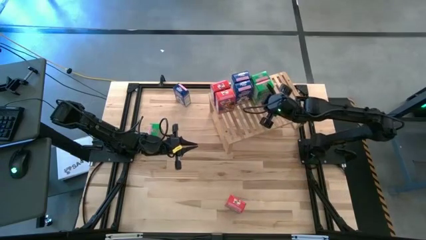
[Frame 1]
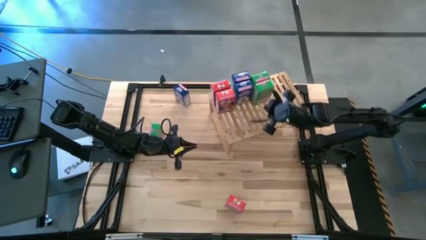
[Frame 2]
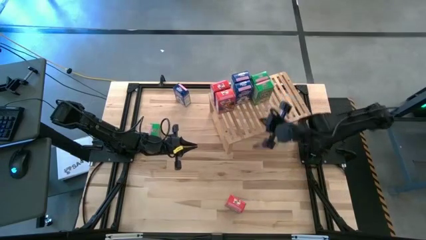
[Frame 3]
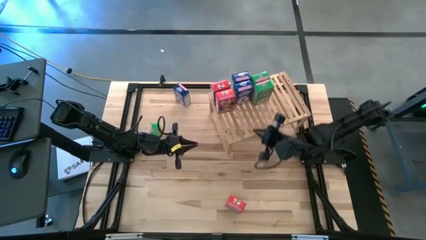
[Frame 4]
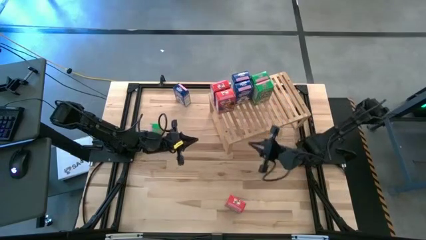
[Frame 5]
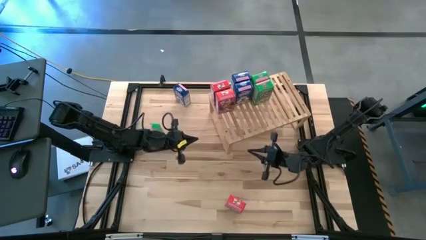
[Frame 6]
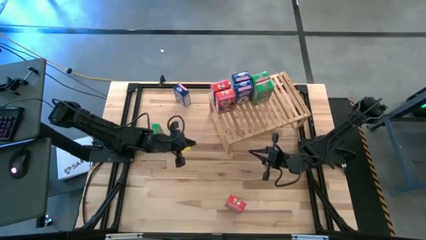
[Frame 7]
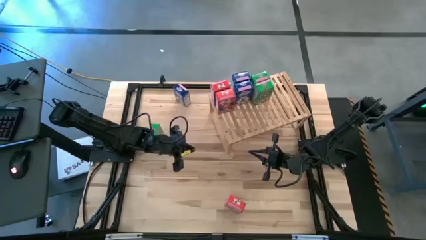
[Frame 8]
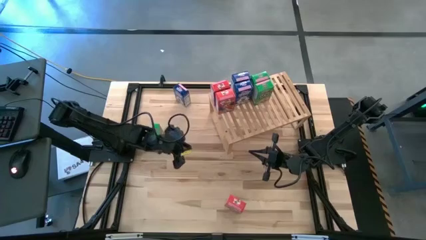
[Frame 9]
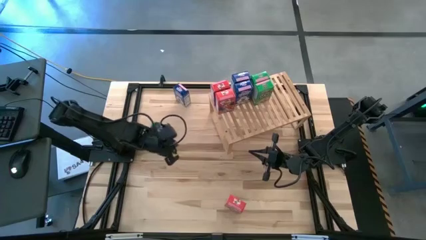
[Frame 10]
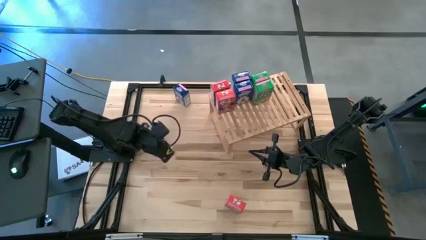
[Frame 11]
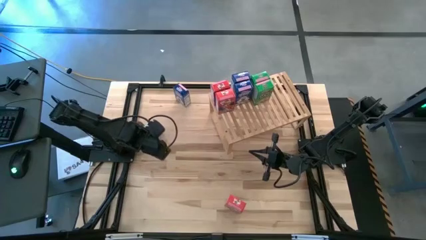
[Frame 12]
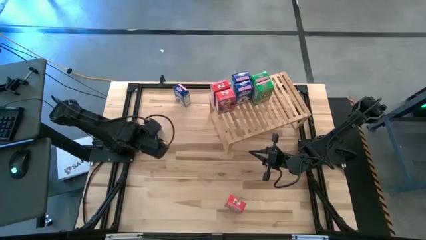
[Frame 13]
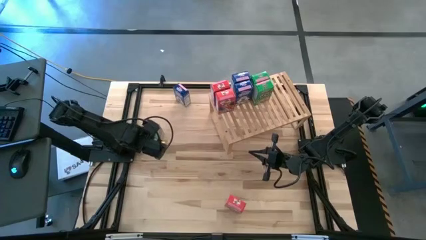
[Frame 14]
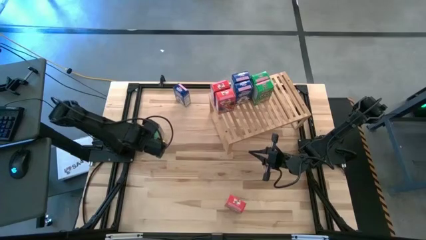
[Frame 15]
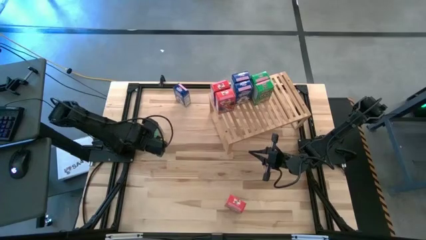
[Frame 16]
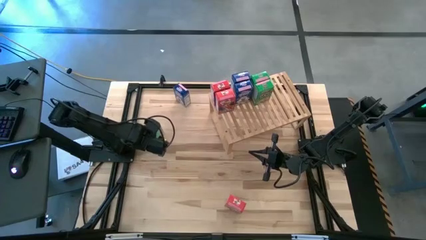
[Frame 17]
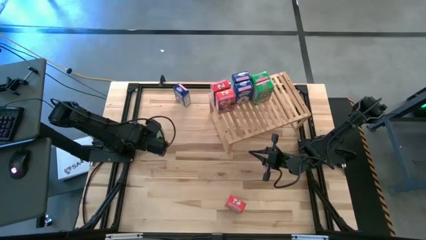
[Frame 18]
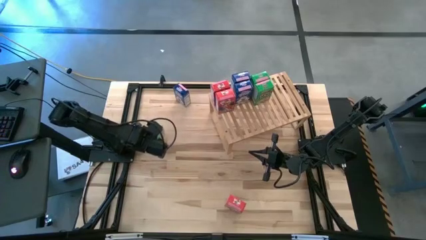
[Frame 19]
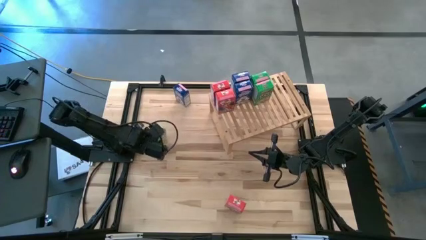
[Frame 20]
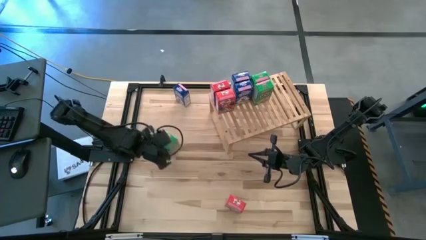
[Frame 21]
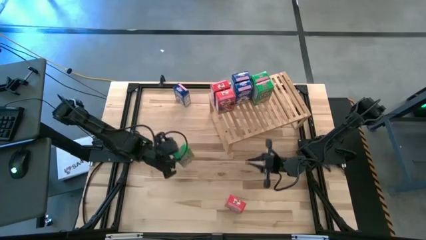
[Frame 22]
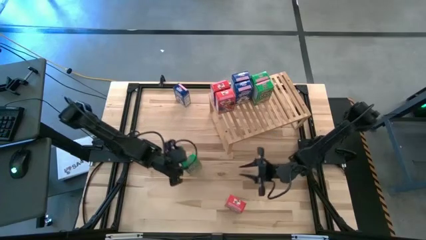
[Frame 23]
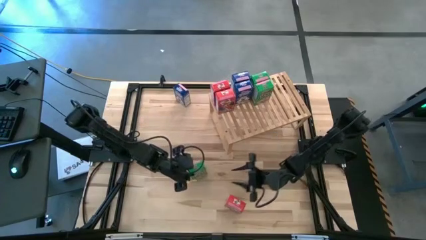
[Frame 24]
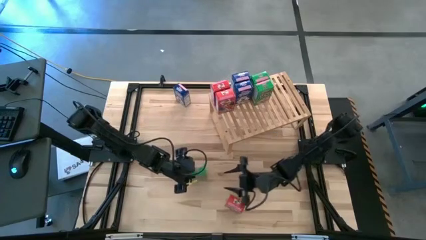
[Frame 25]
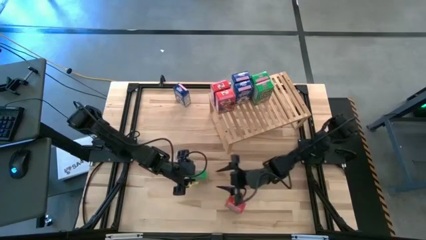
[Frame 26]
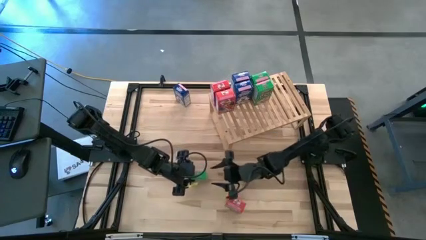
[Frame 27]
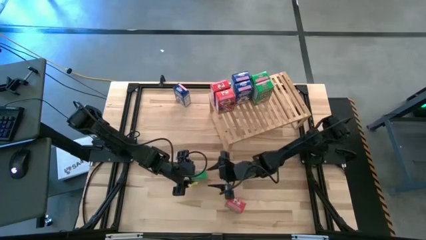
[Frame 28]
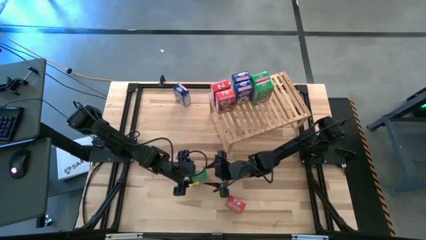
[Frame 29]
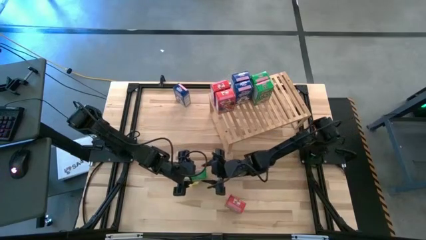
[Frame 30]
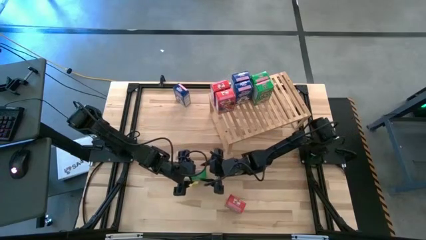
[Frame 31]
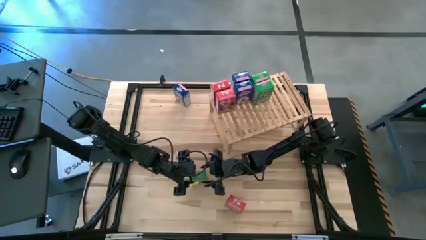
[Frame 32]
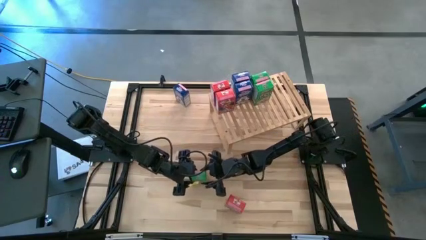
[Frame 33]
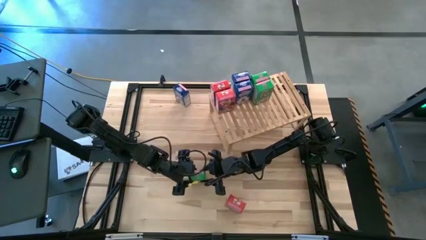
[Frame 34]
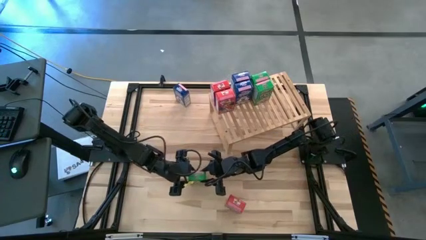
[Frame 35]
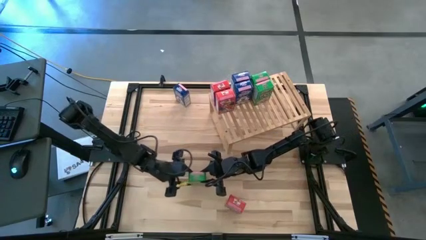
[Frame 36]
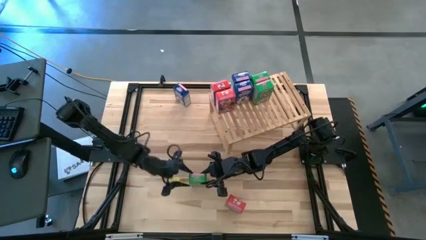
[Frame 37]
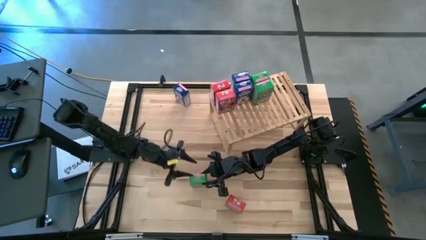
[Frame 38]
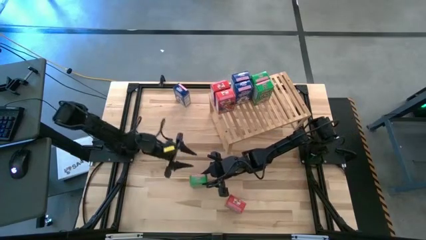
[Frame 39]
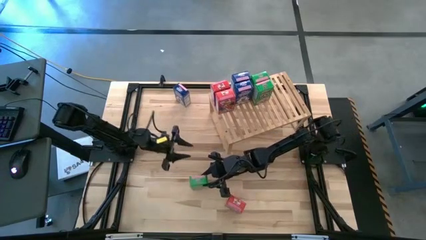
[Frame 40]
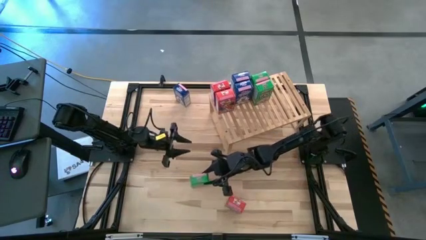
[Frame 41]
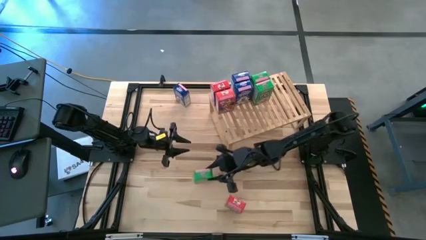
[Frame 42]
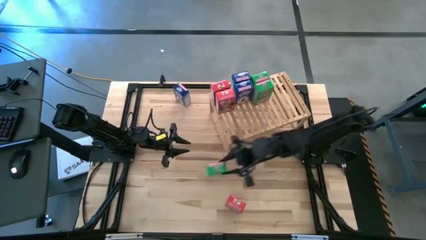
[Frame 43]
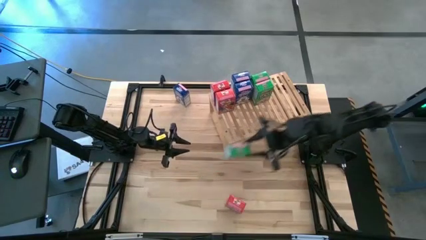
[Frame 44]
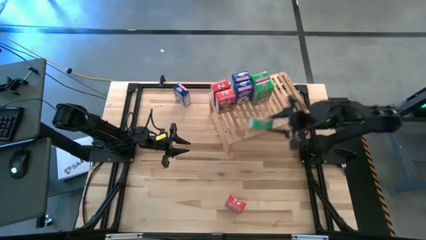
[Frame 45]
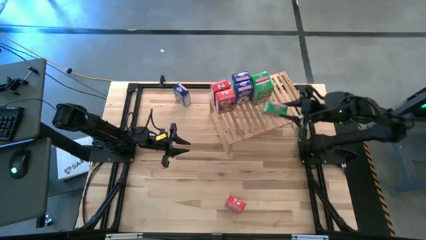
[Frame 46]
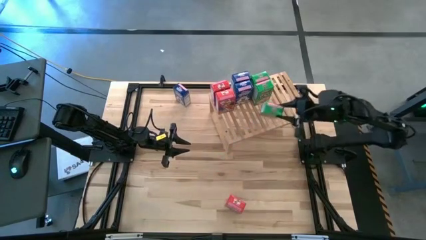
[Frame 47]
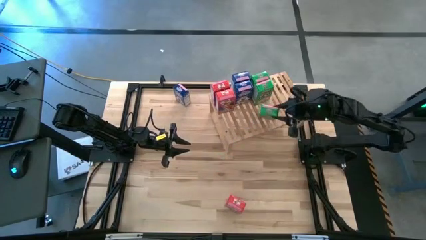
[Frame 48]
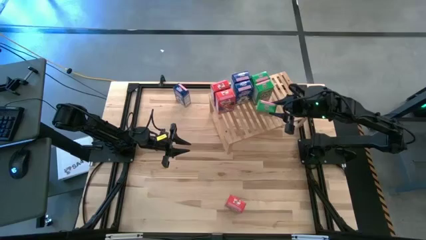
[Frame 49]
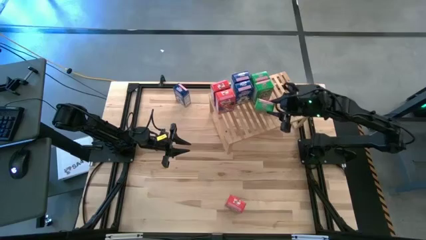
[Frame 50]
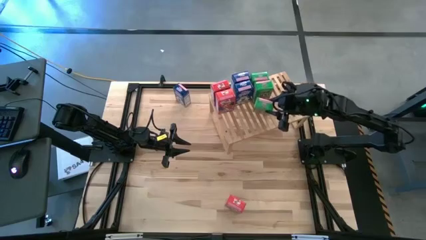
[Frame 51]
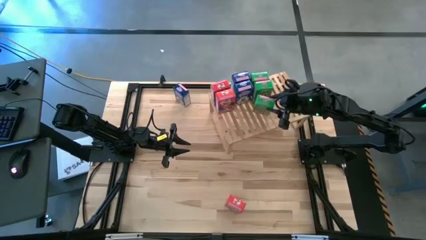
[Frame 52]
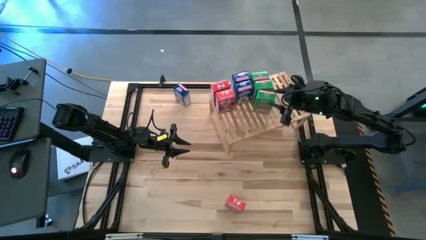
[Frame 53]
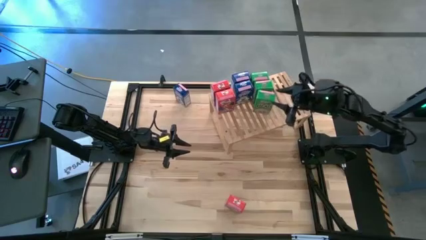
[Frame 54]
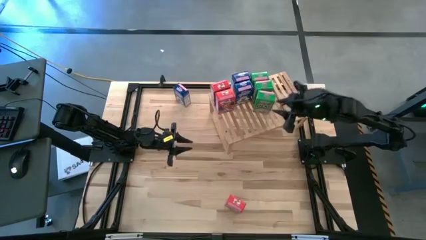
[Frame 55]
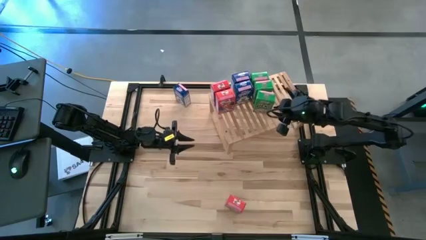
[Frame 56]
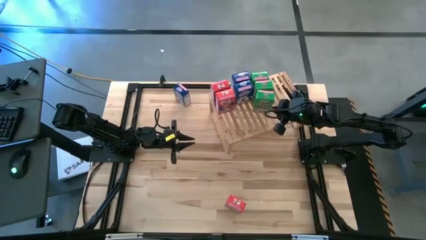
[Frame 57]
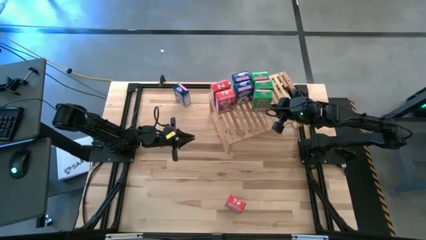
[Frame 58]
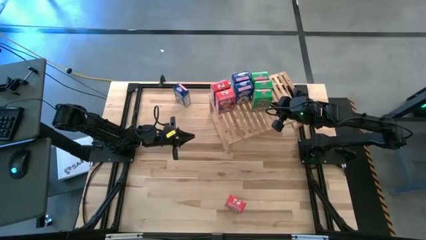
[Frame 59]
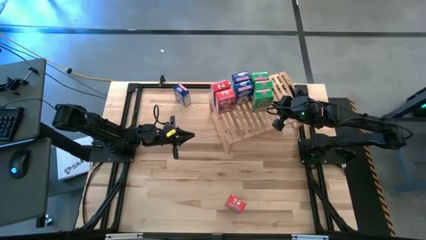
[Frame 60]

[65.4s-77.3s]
Task: Stack cereal on shelf
Put the green cereal box on the shelf aligned with the other green cereal boxes

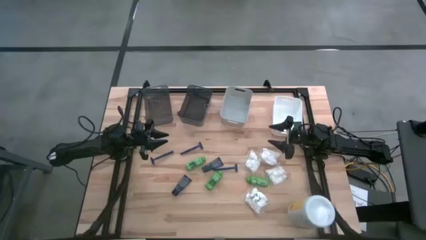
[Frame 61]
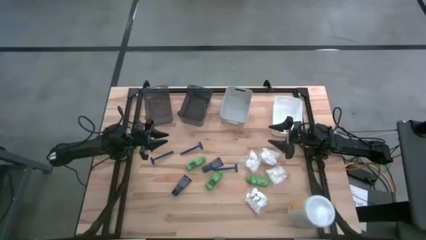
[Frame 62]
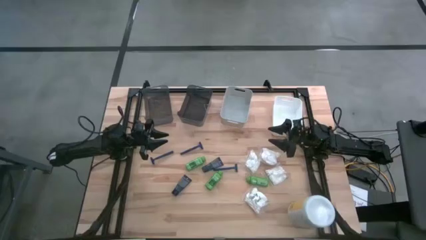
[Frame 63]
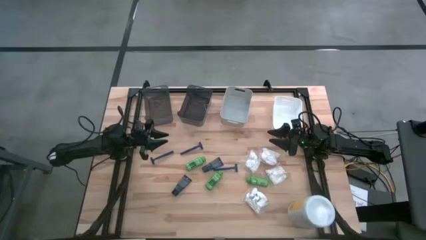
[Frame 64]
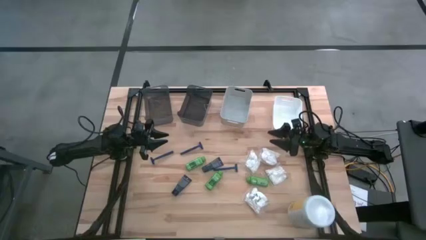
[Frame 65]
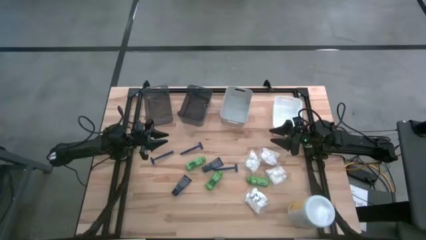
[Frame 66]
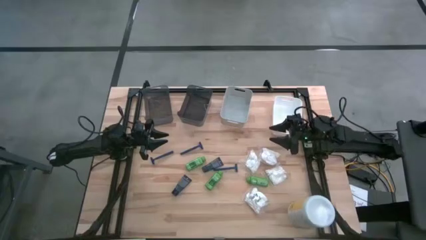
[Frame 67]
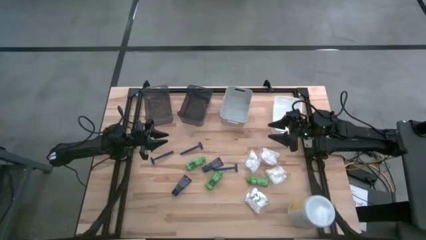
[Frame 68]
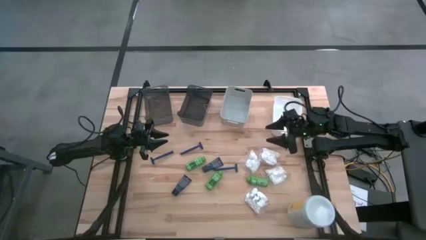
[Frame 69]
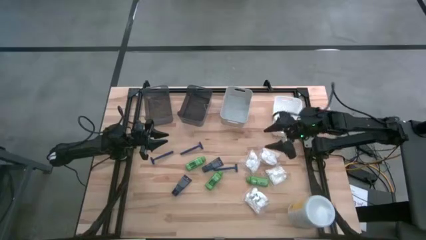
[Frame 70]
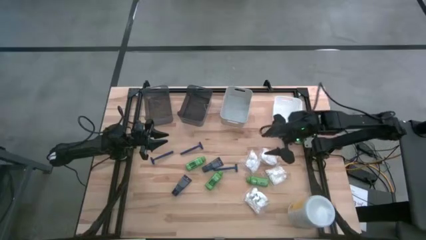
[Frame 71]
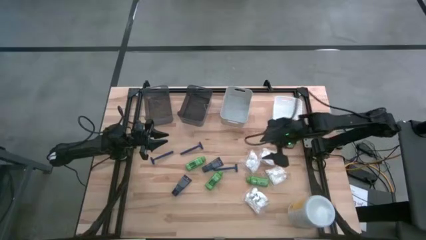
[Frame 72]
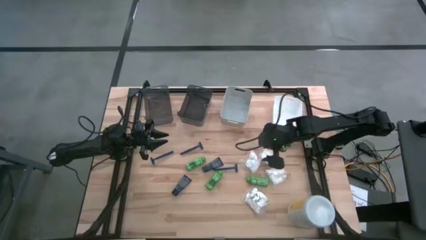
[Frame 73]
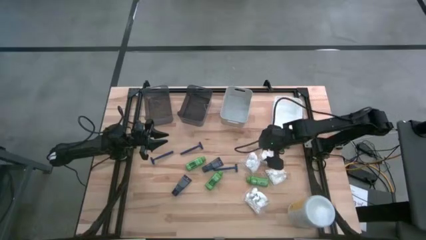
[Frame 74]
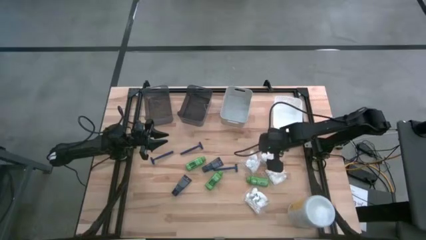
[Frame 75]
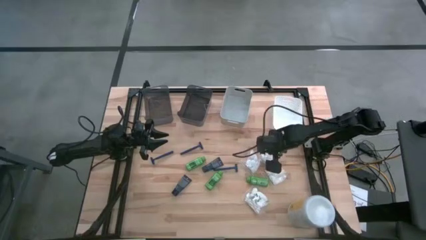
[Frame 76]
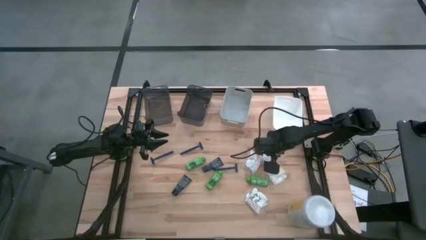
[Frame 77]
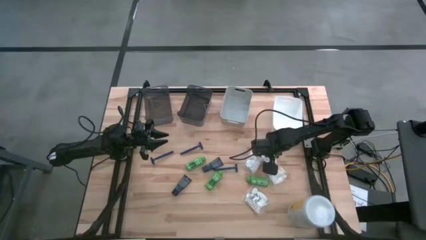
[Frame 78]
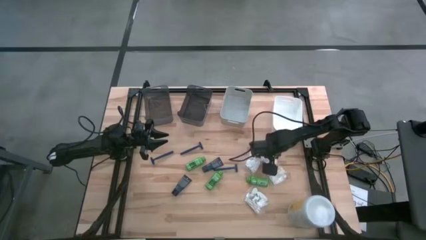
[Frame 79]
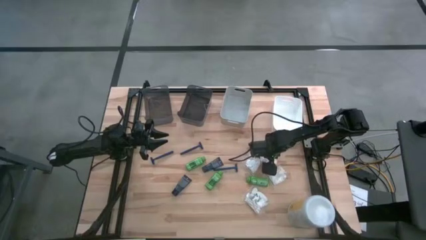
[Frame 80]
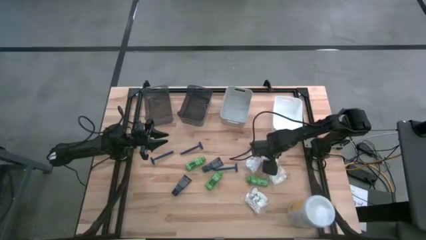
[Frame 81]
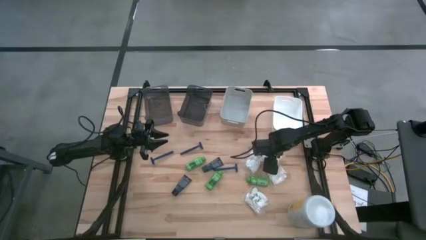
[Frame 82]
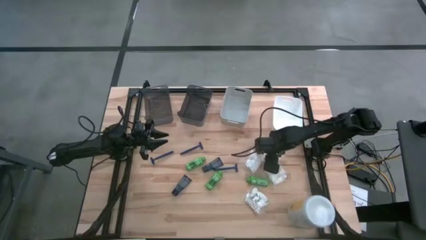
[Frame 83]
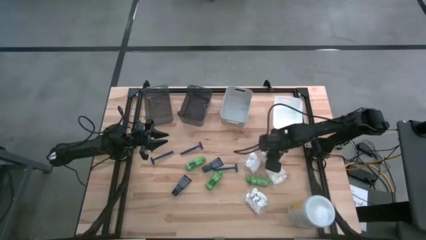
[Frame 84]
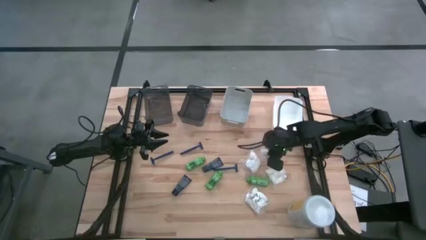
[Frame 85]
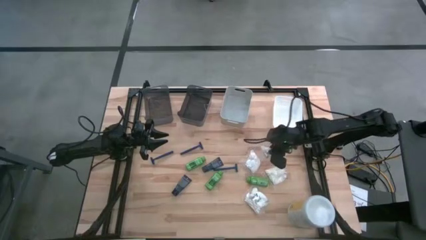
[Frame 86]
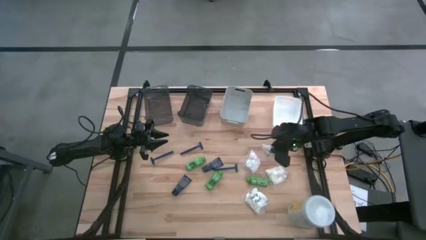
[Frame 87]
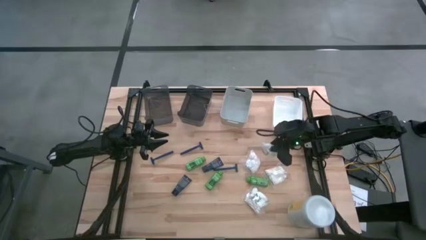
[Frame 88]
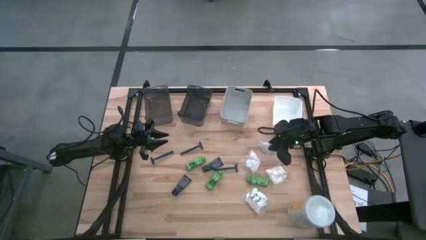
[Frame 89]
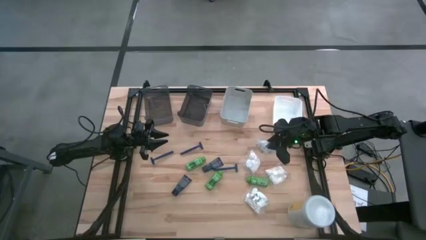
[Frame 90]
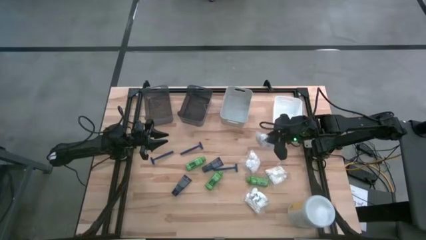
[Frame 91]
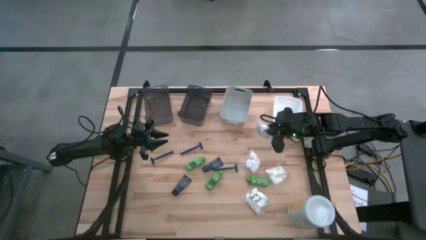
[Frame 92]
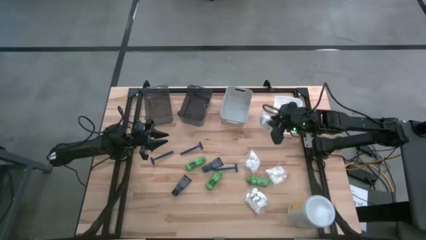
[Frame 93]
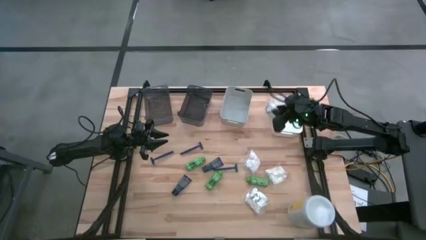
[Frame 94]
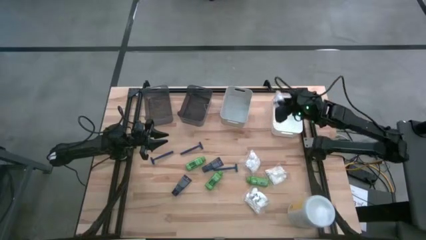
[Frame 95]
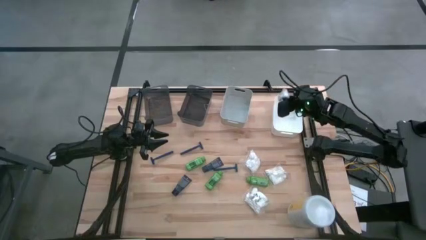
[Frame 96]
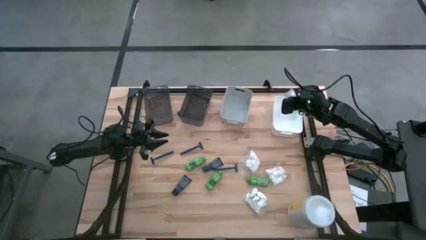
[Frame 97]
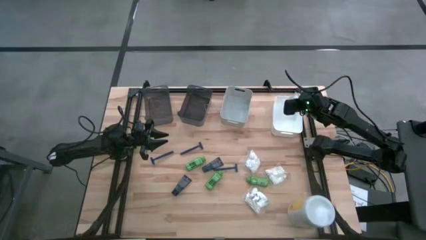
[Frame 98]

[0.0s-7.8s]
Task: Pick & Place Travel size toiletries
Put the white cotton pack into the white bin
